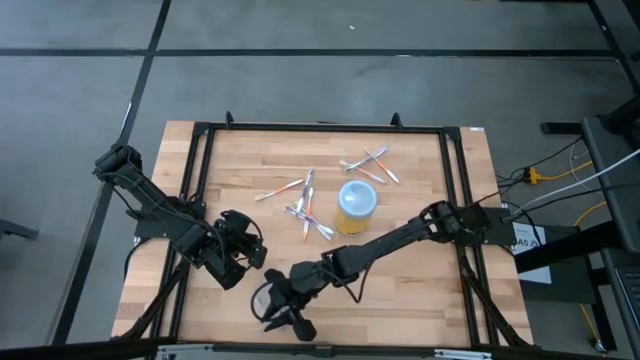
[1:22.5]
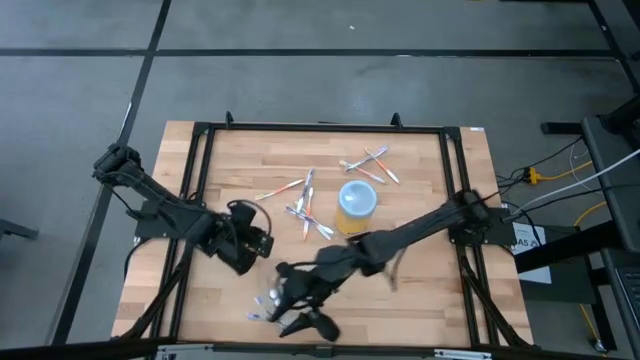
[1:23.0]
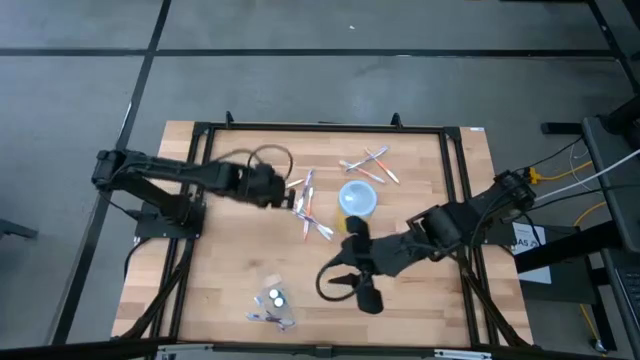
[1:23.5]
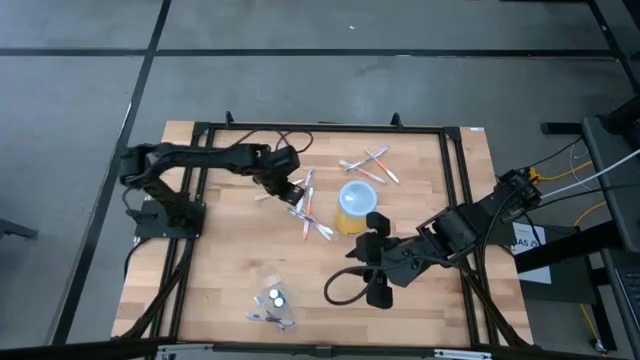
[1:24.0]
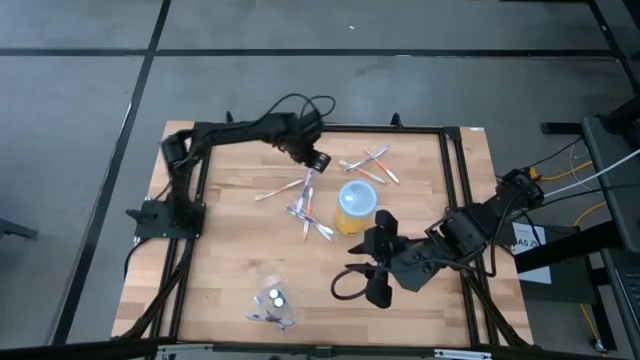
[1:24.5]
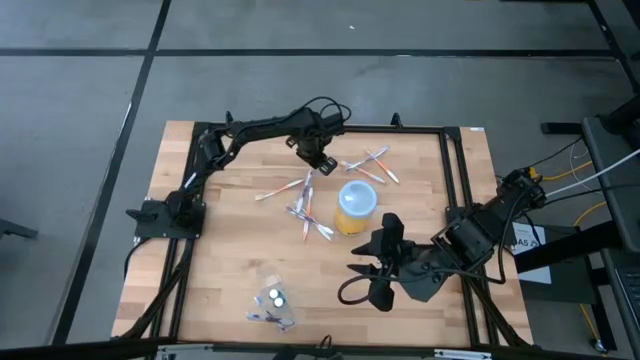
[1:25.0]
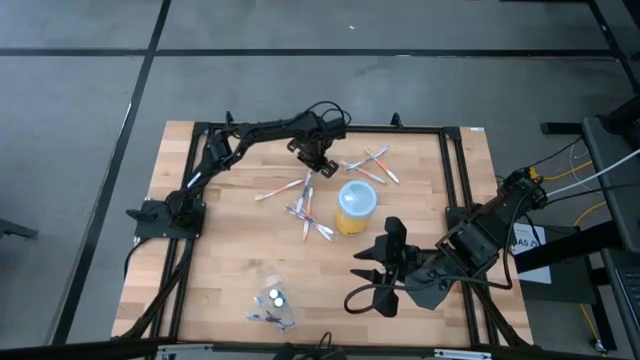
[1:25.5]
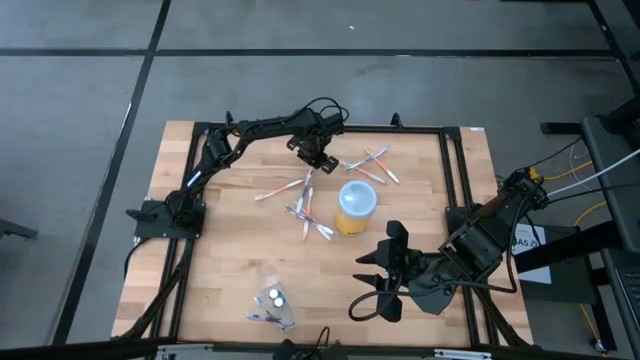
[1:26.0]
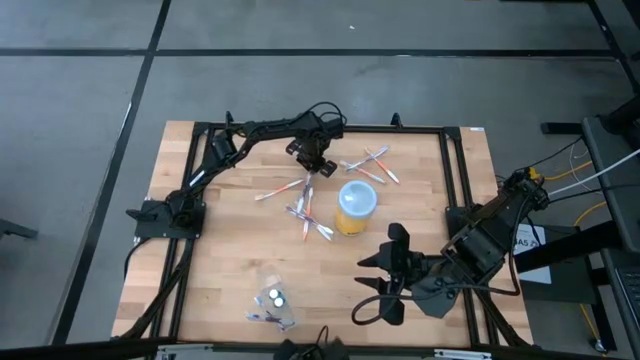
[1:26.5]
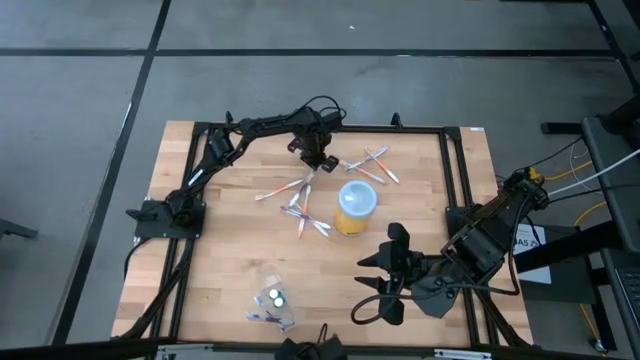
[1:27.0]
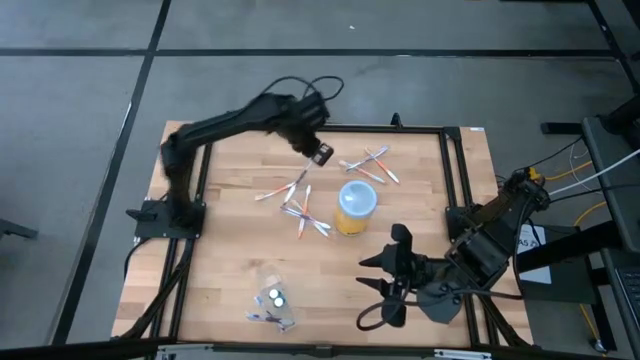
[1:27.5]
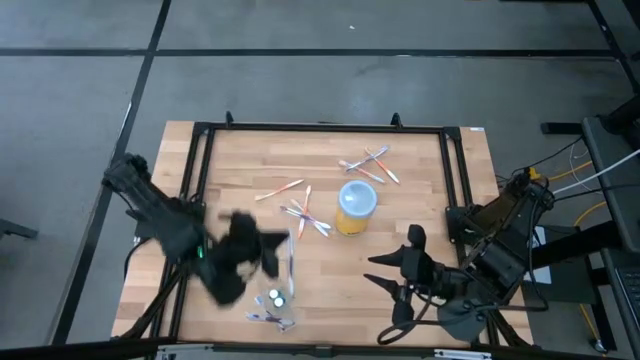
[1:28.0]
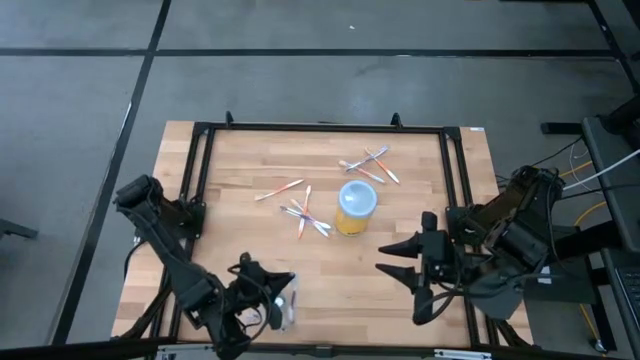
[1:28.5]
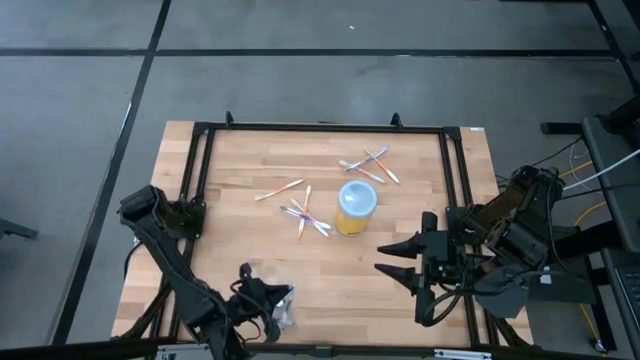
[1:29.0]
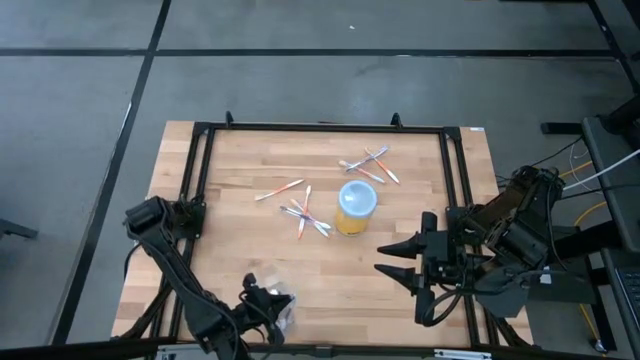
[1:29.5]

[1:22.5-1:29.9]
Task: Pick & Place toothbrushing station
Put the middle violet toothbrush into the right side of the transparent organizer

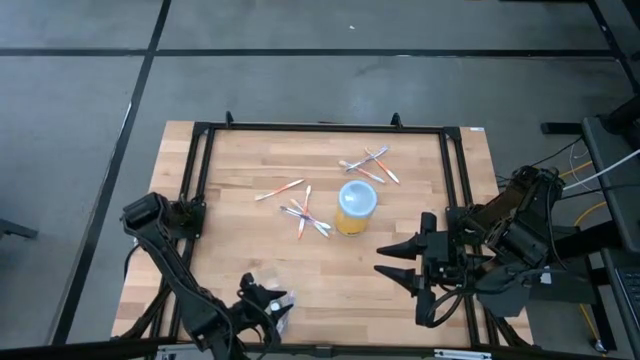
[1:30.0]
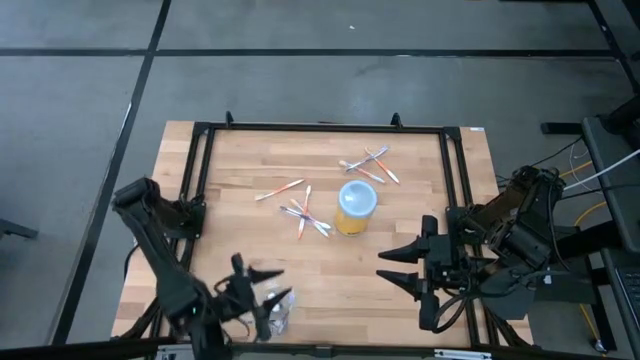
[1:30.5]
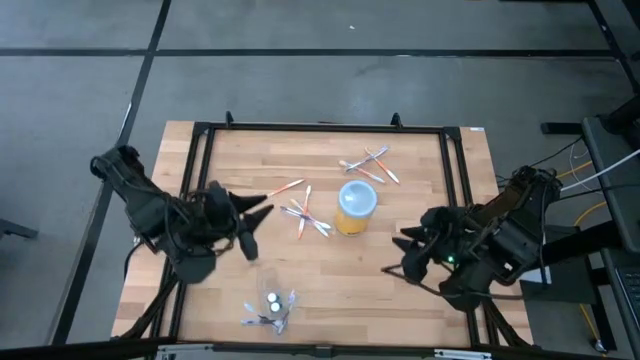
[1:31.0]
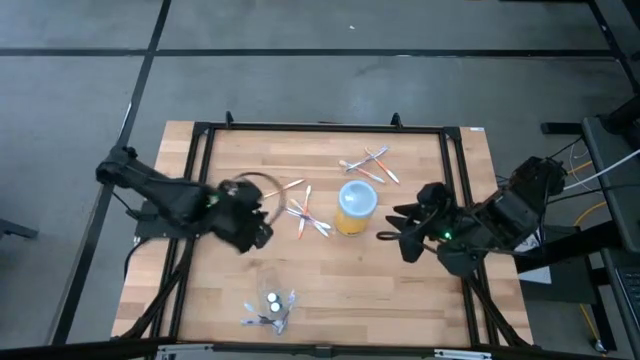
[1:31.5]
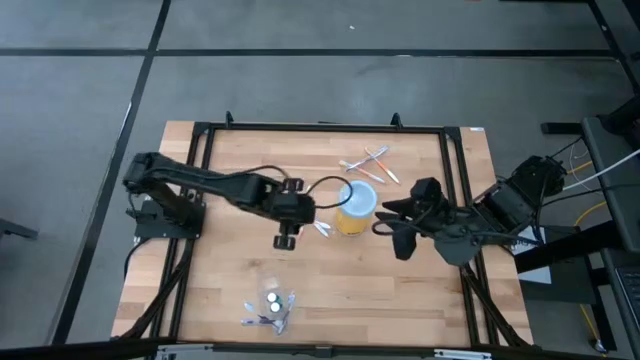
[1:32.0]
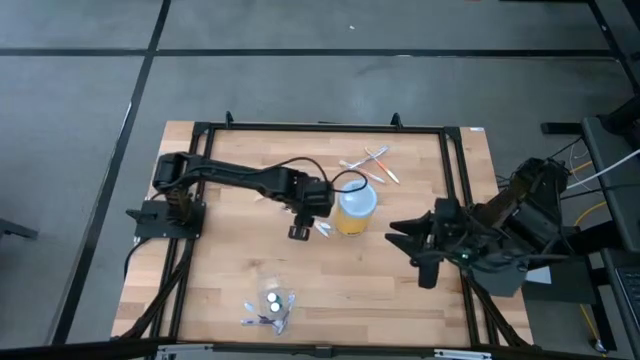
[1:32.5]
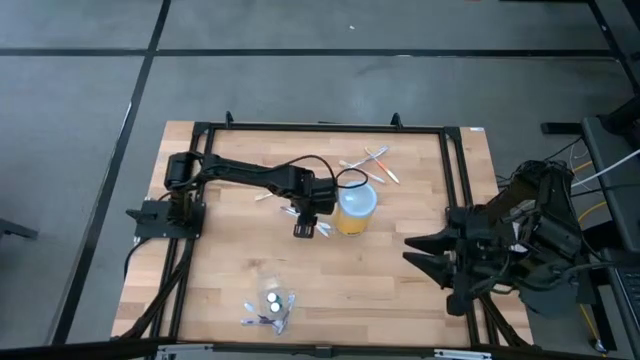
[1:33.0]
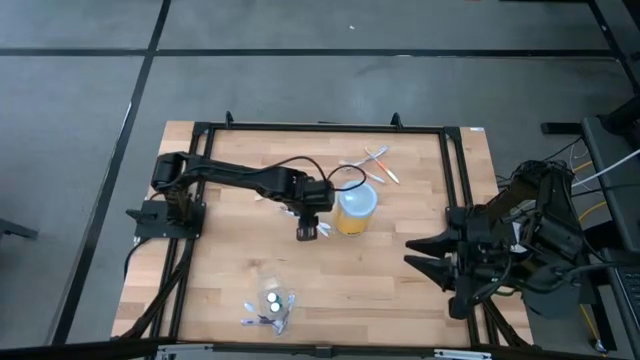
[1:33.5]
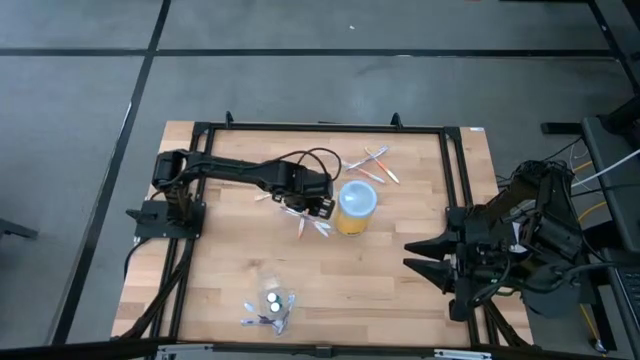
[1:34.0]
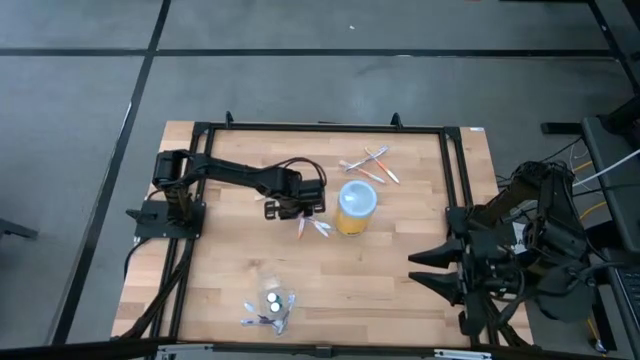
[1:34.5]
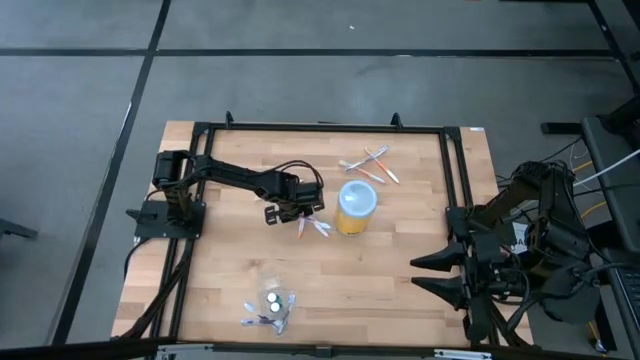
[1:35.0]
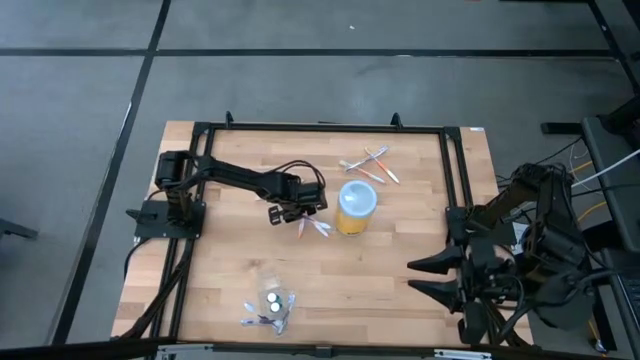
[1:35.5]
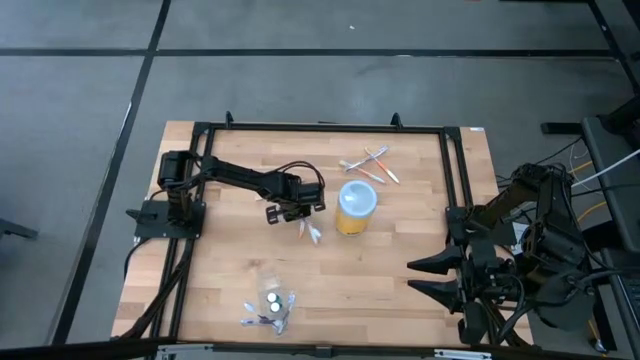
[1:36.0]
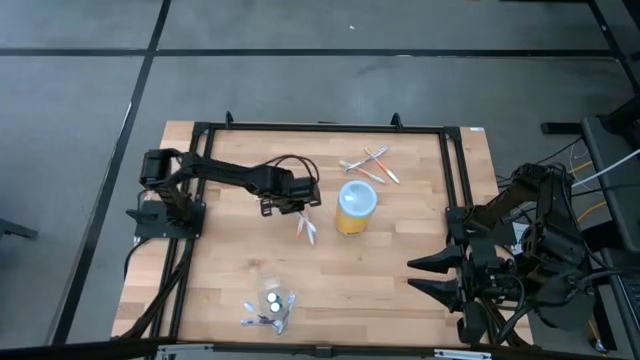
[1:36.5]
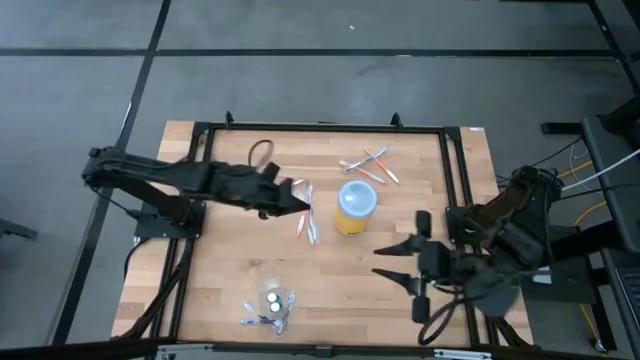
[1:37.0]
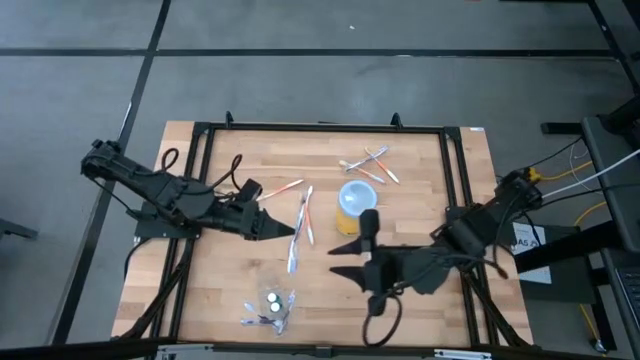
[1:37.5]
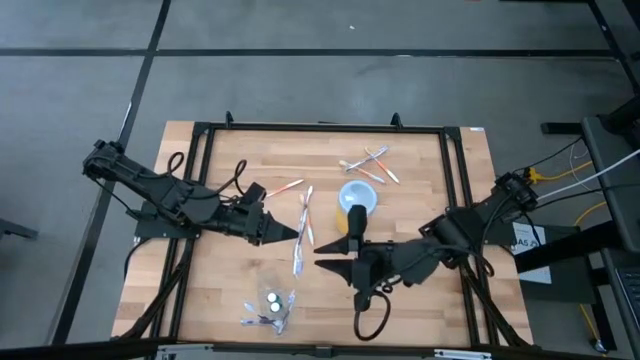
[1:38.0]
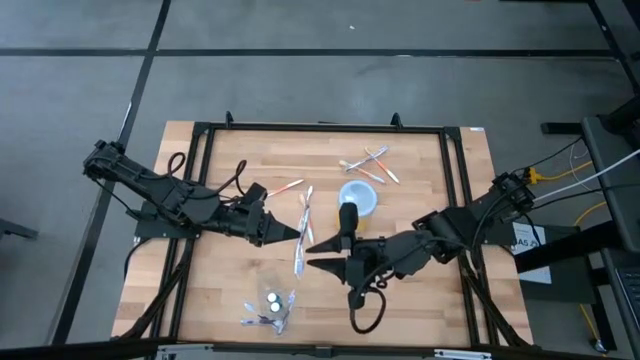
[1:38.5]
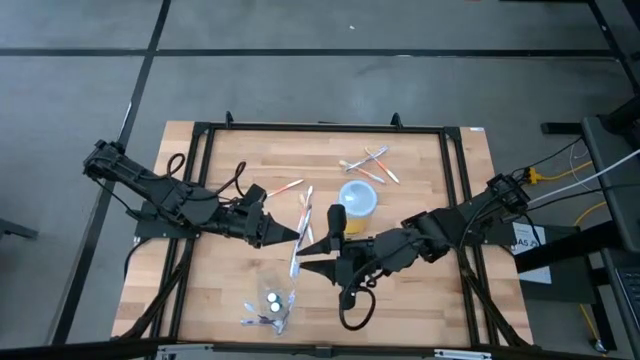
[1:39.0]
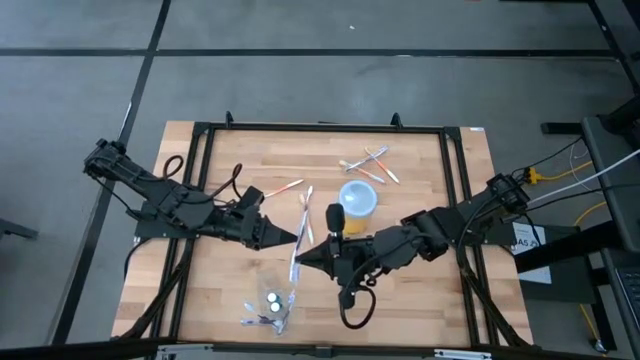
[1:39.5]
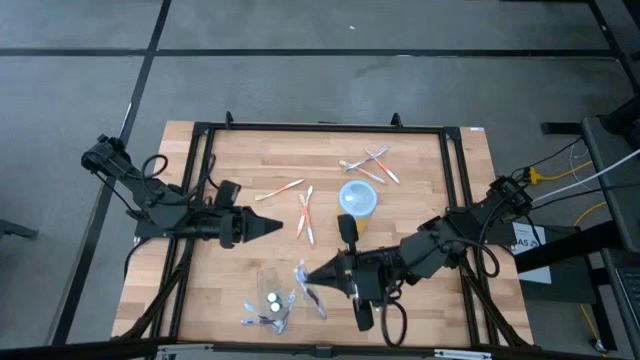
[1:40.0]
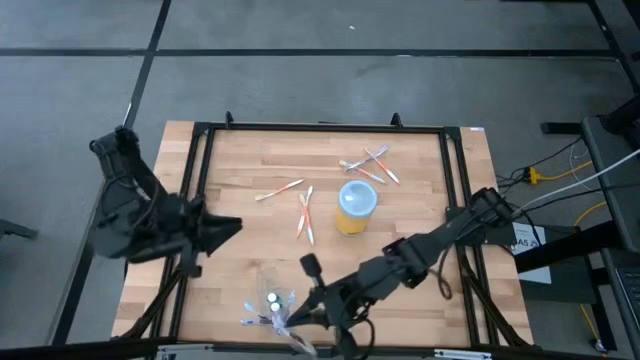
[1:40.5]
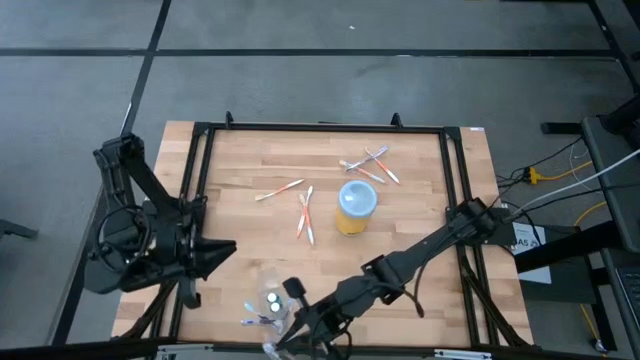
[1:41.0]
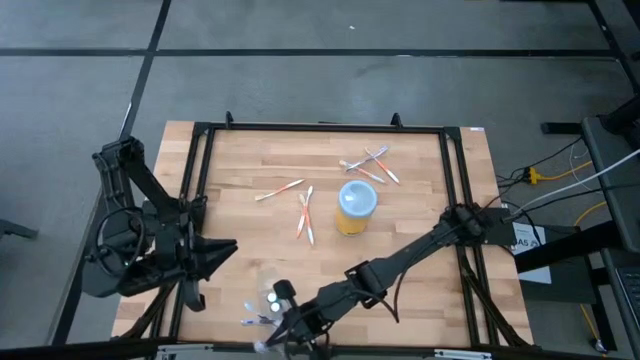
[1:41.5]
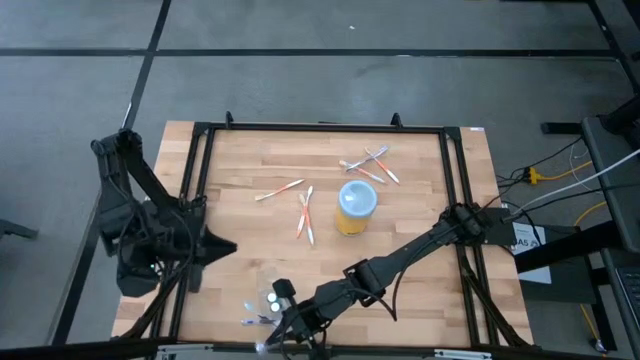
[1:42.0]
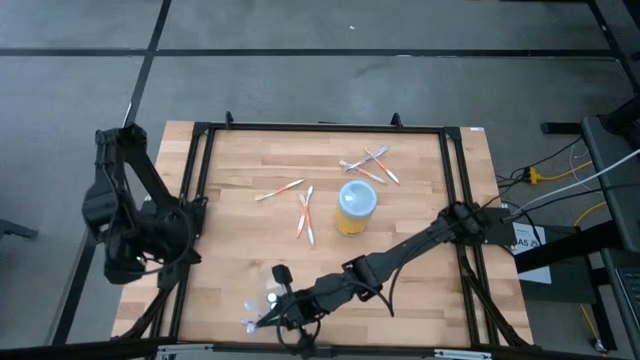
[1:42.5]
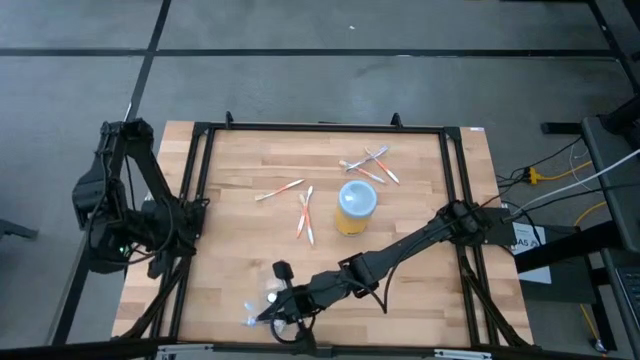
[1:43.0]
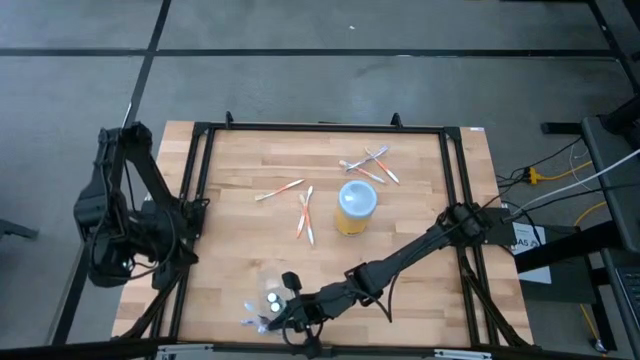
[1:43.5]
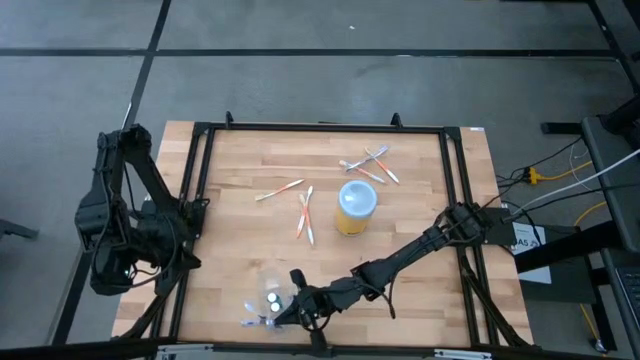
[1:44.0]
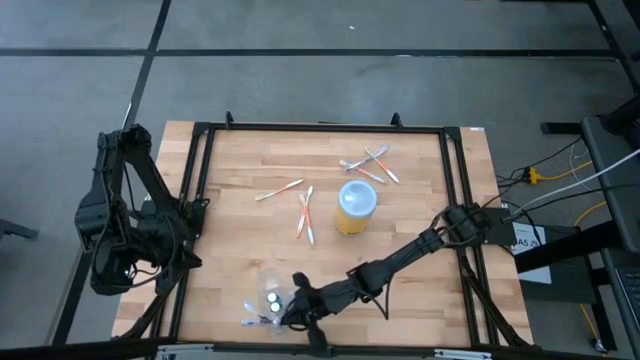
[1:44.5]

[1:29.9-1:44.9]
Put the bottom violet toothbrush into the right side of the transparent organizer
